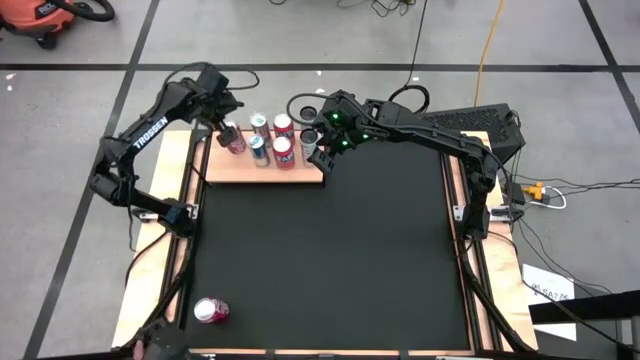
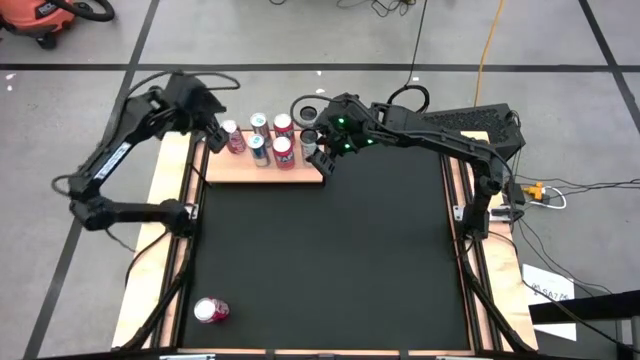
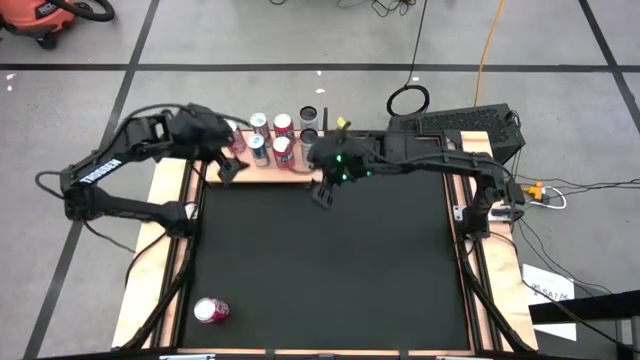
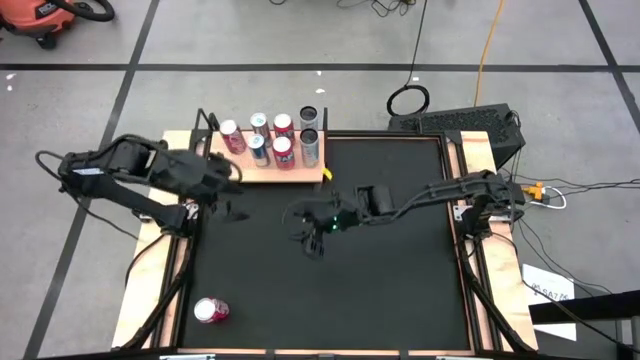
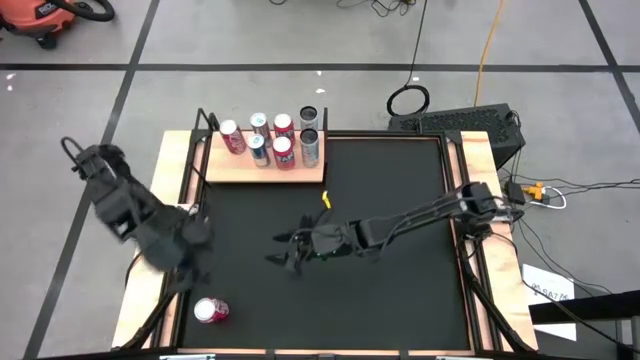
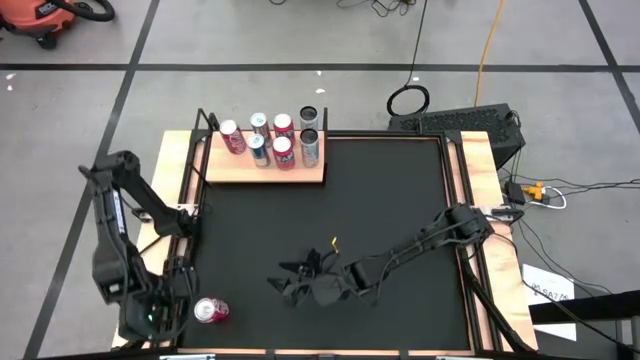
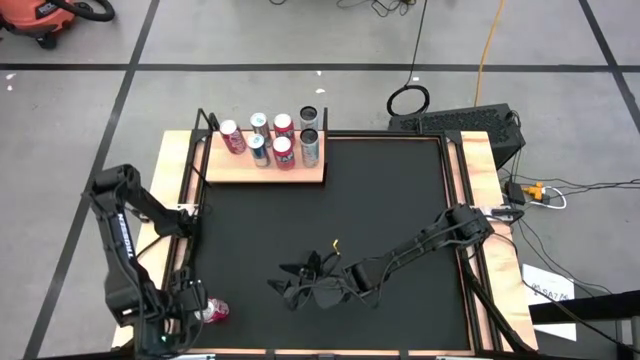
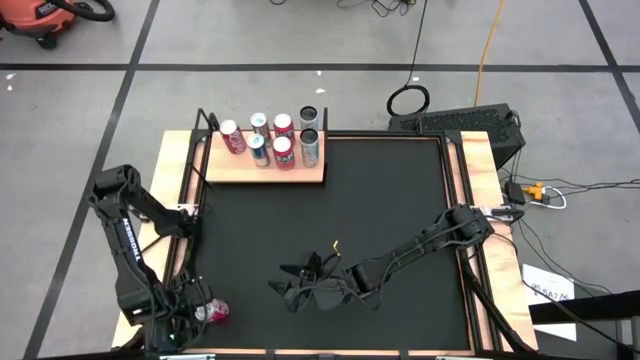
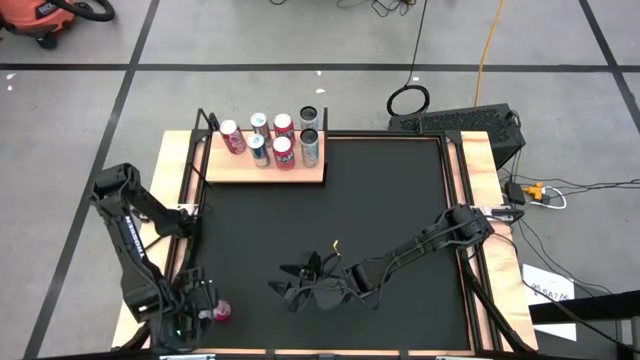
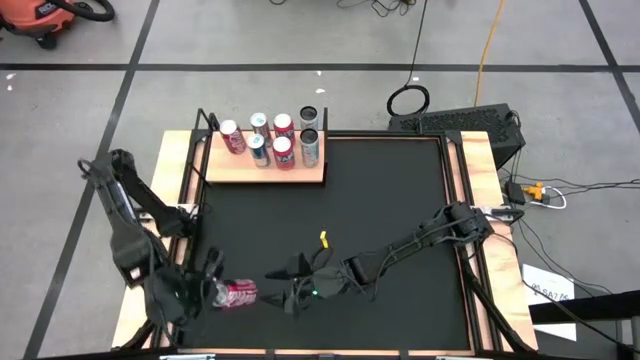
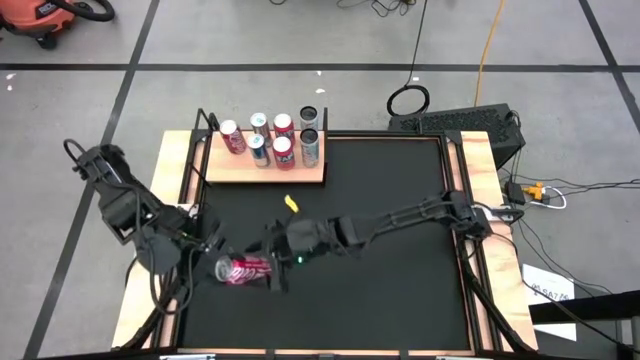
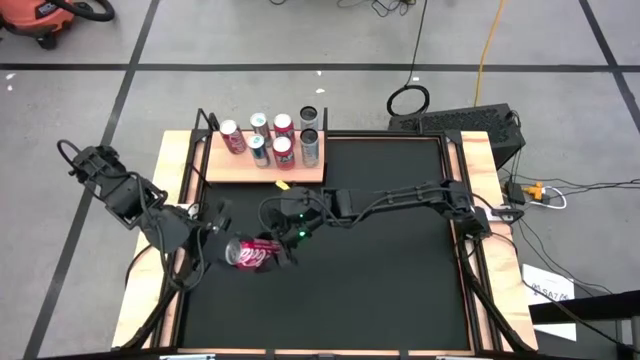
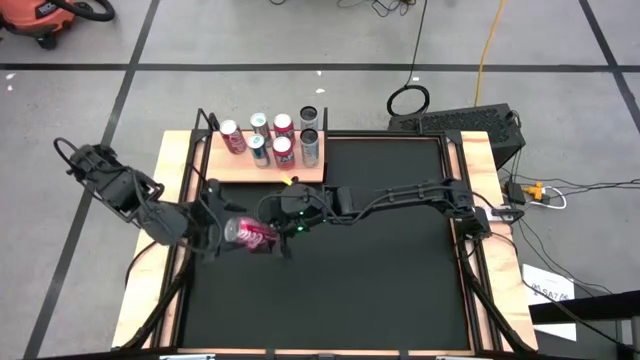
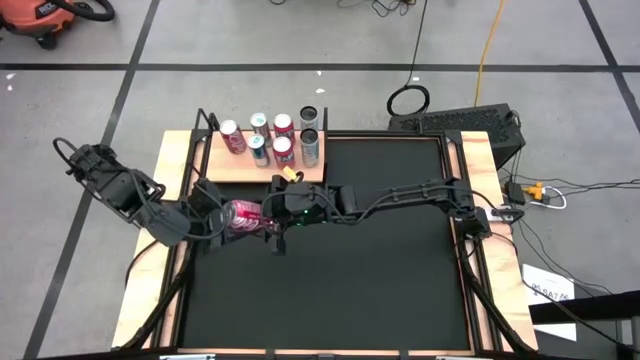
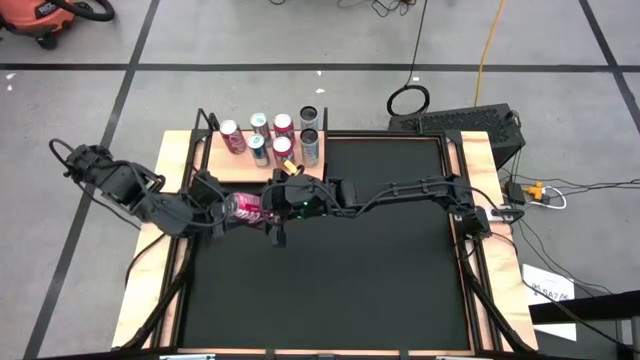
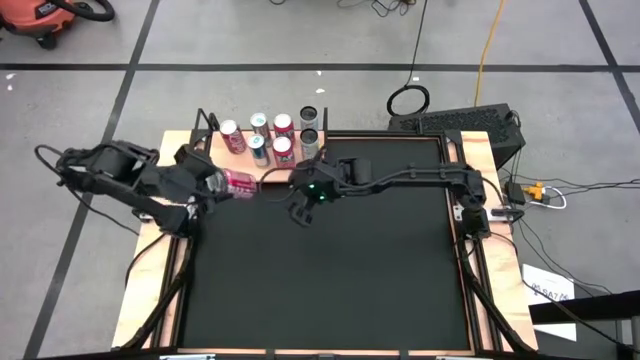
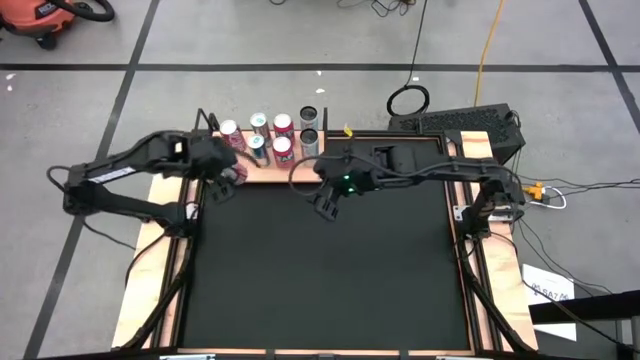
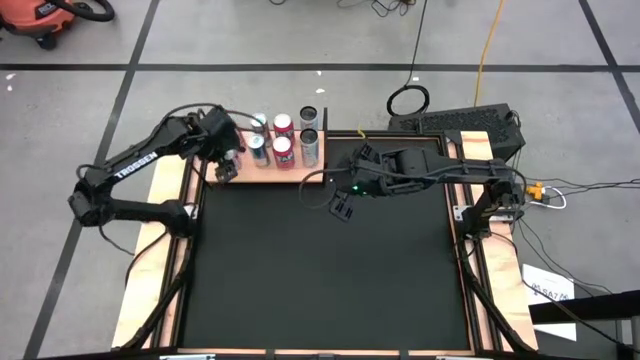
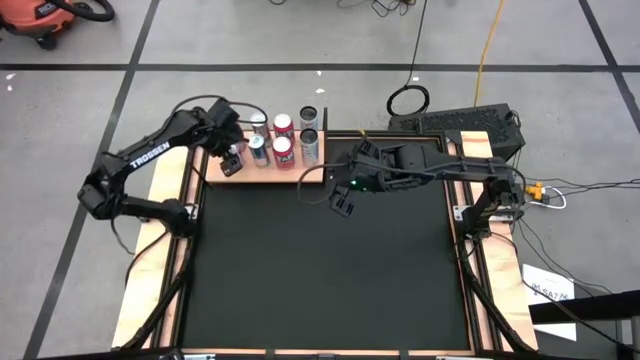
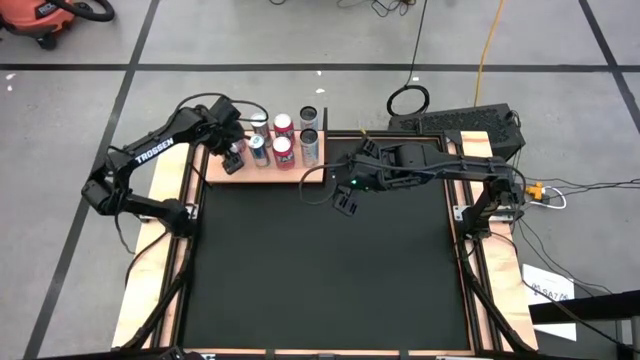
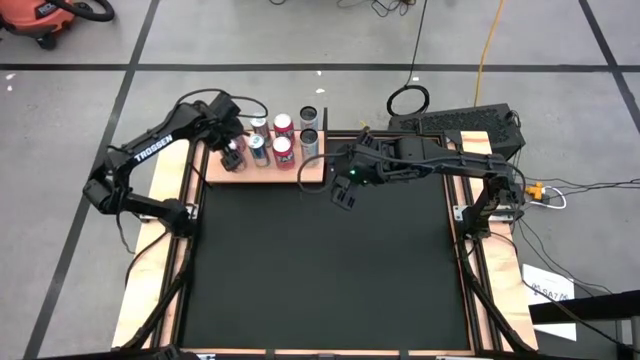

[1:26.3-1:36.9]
Task: Place canned beverage on shelf
Put the red-white soda can aligned with the other red-white soda can on the shelf

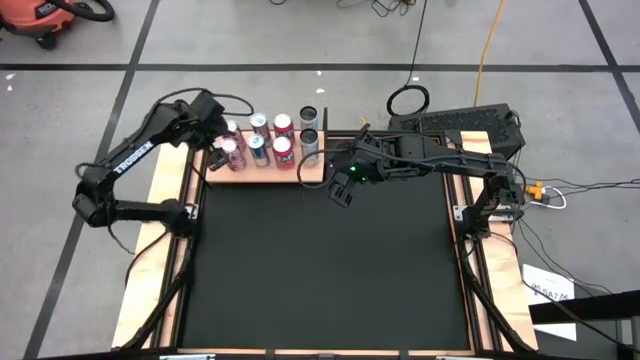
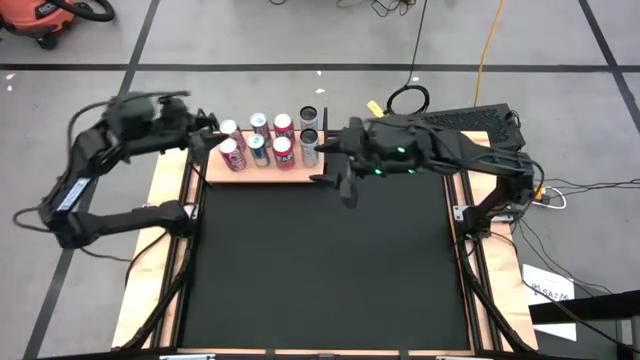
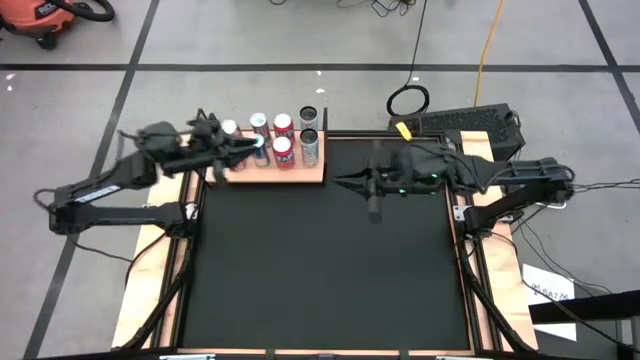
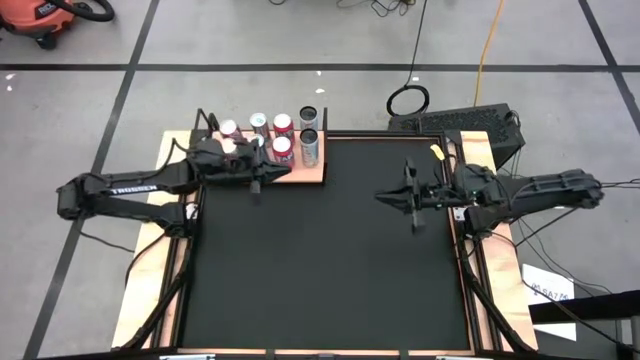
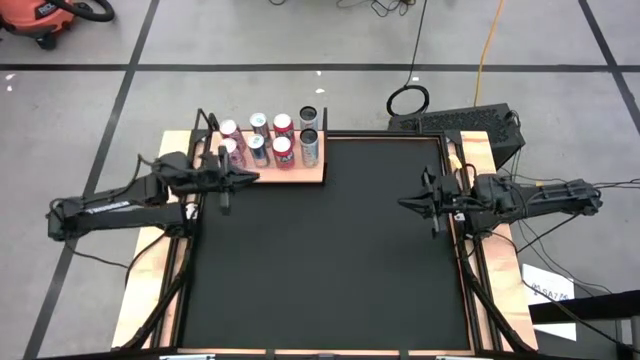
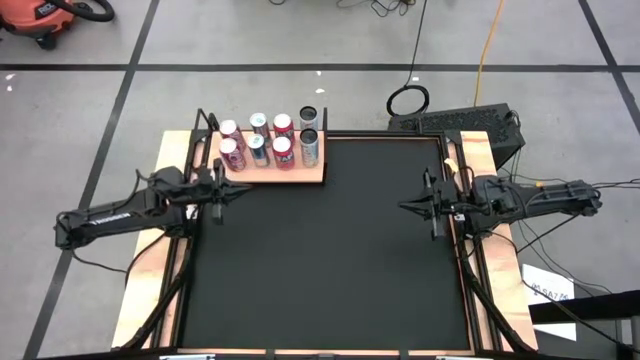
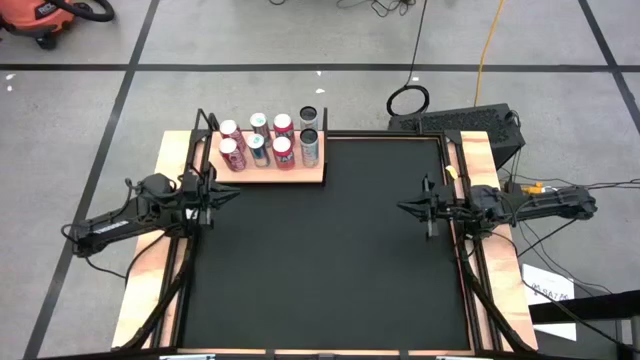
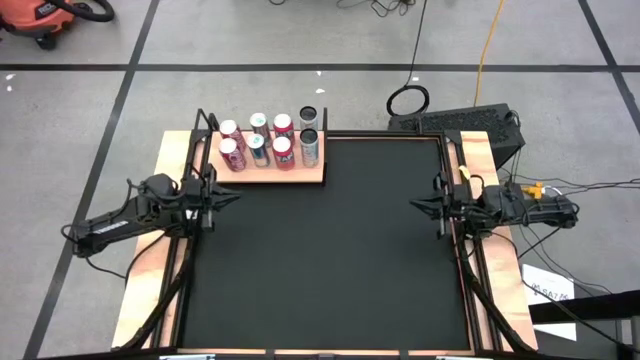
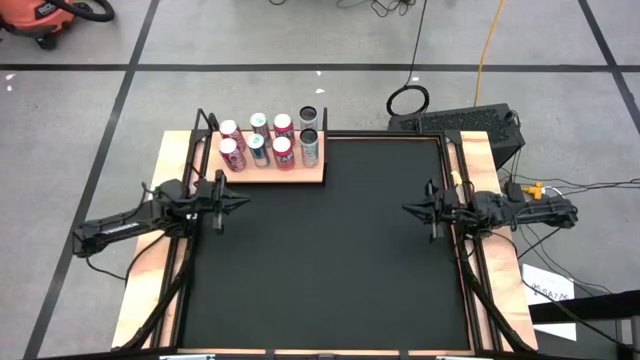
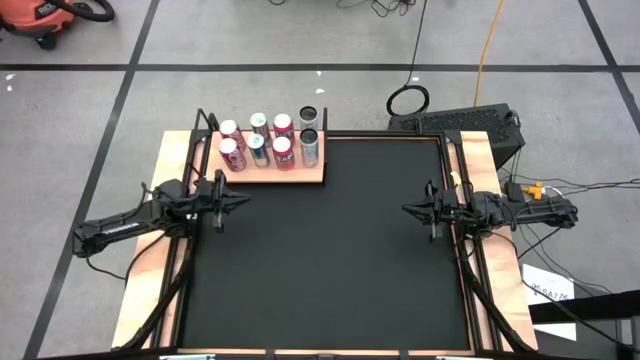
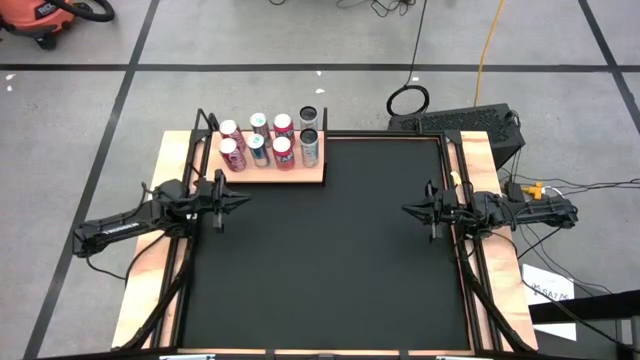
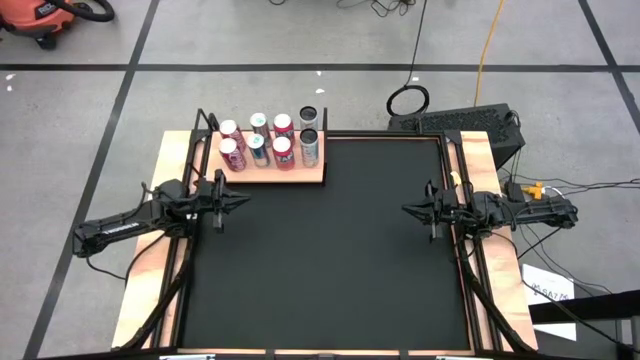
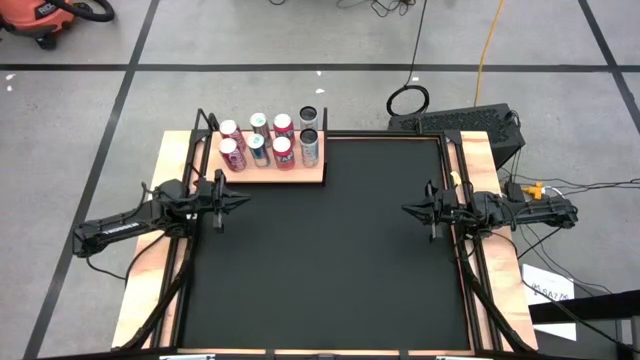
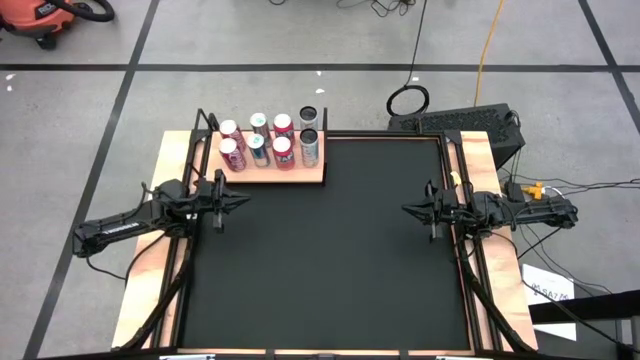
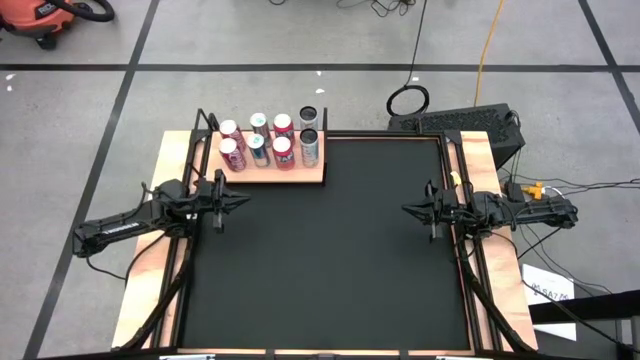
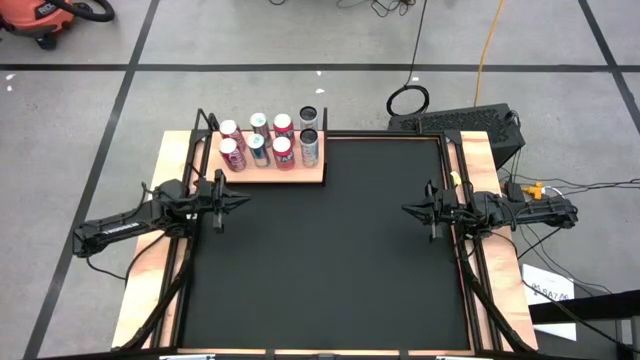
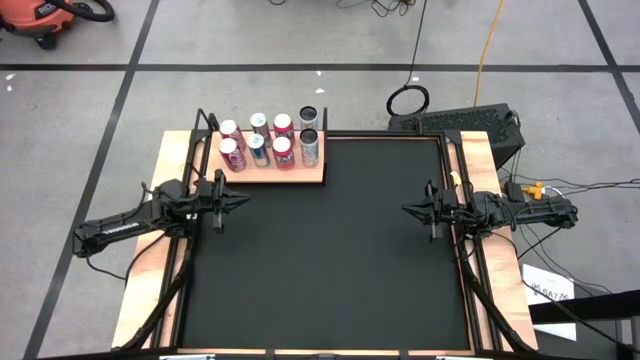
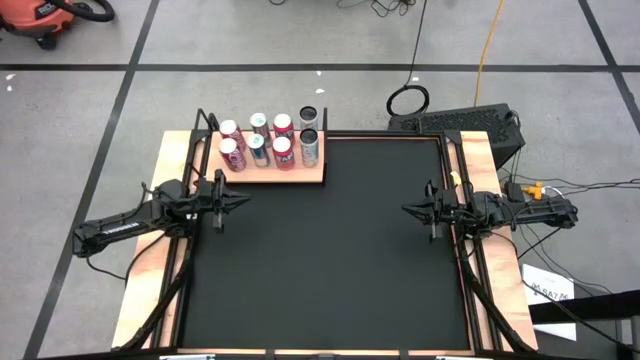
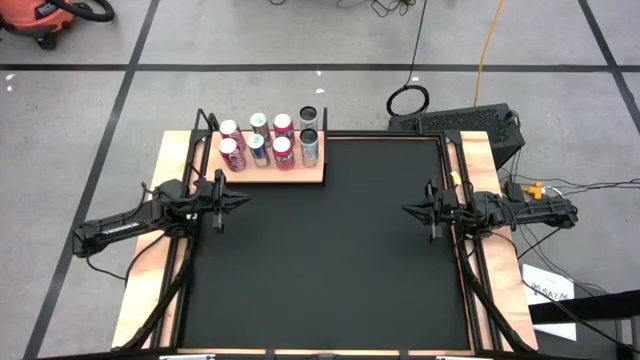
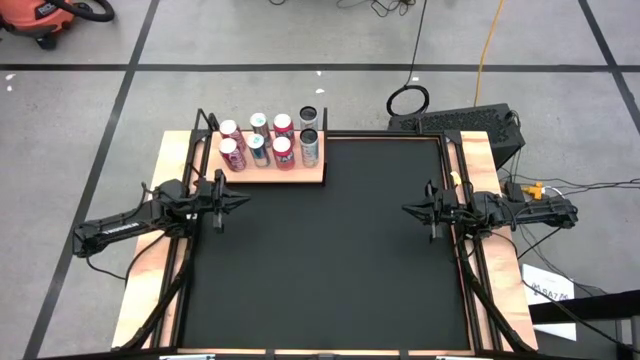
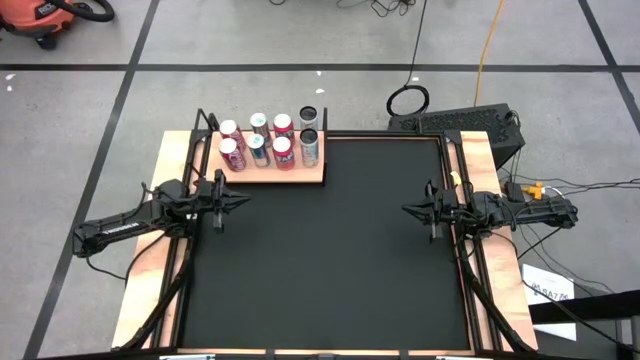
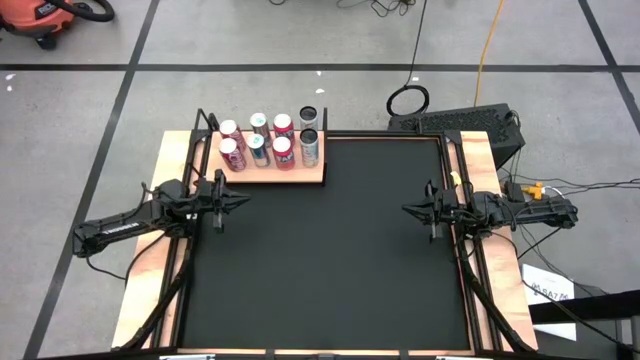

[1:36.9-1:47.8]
Return to Home Position
